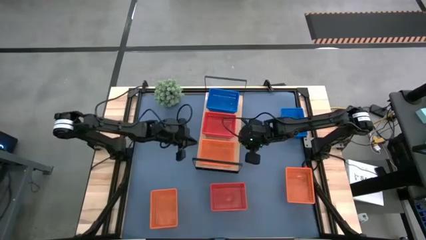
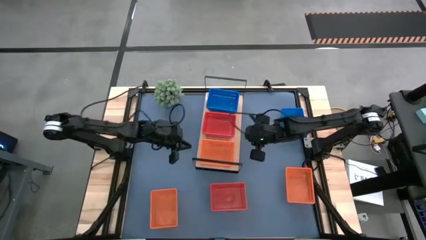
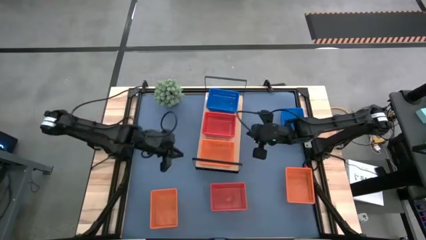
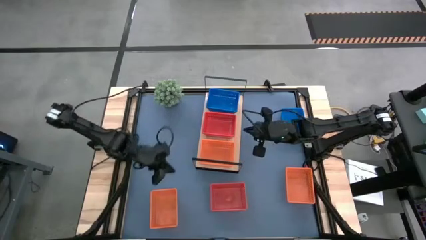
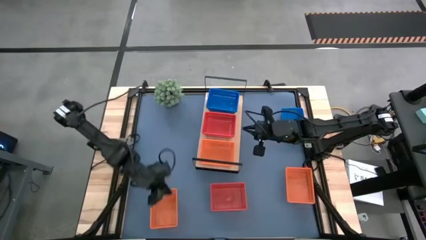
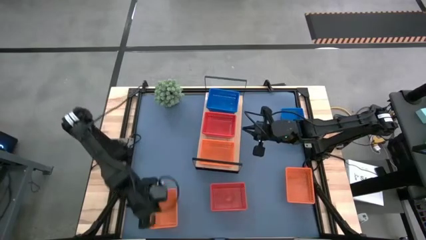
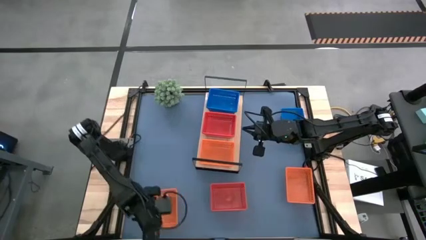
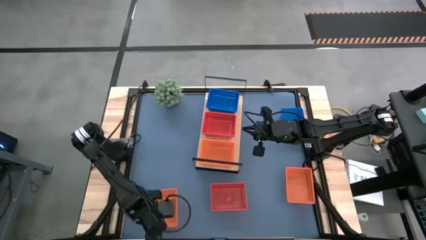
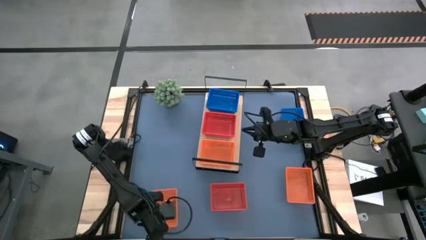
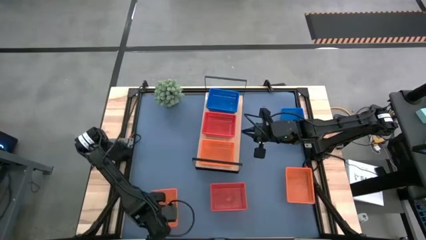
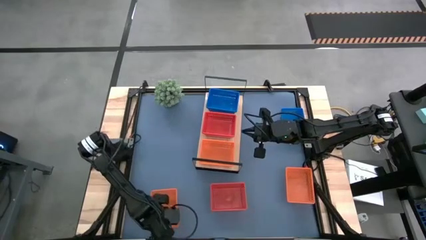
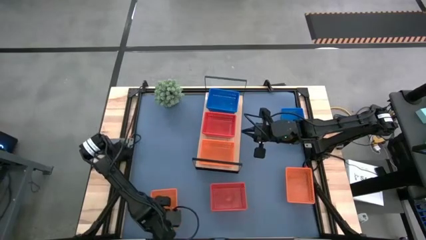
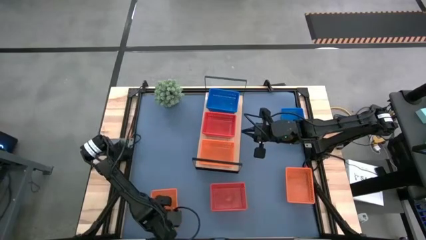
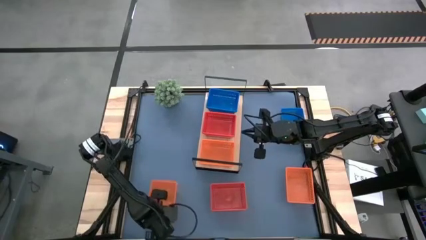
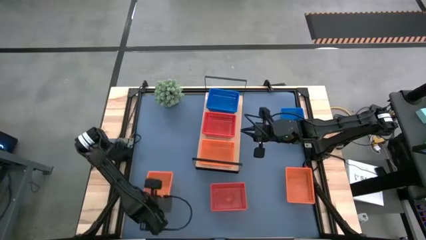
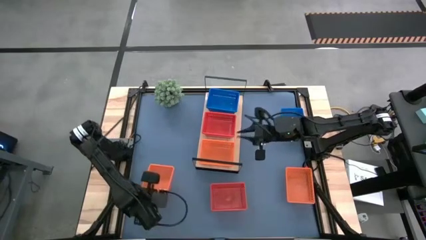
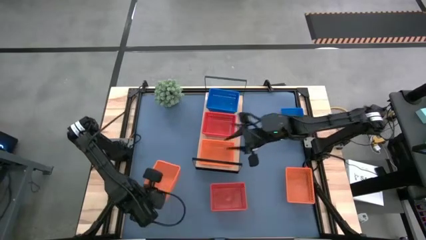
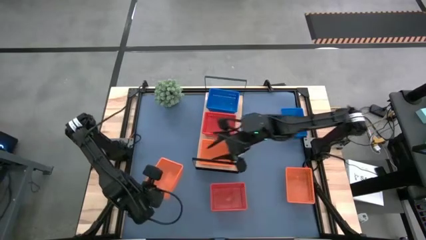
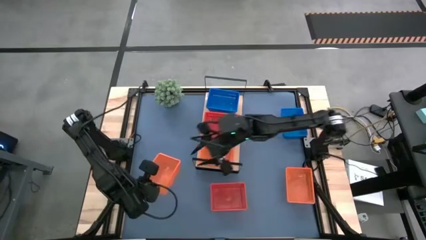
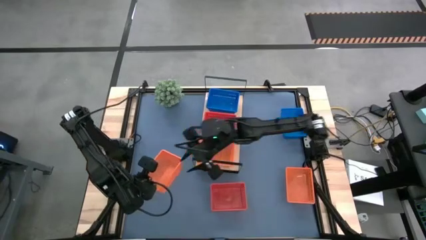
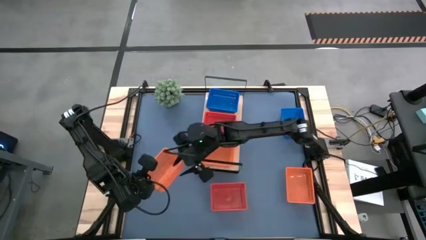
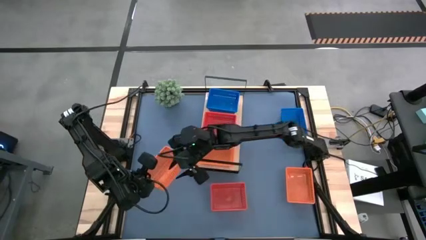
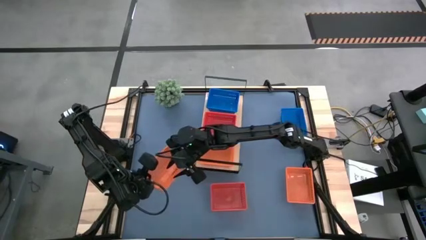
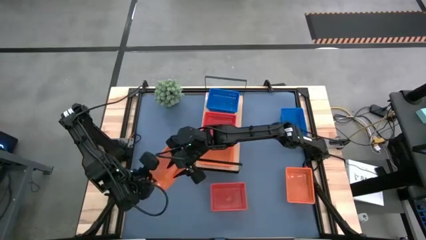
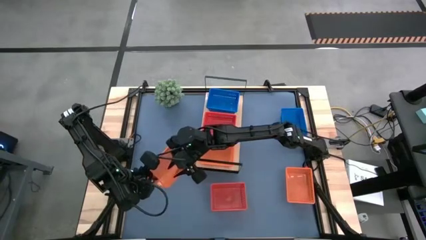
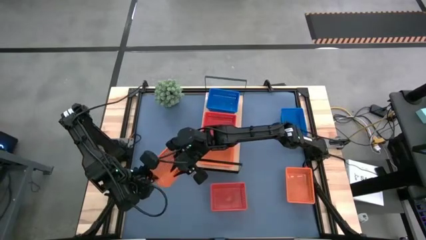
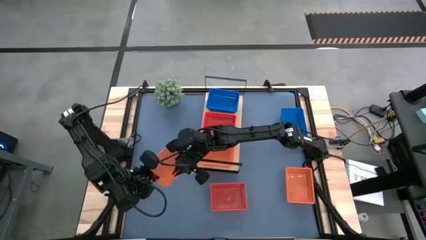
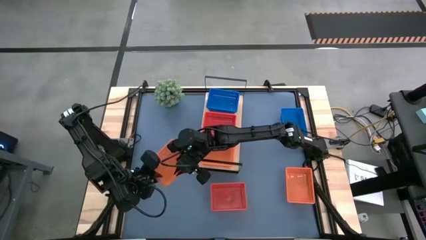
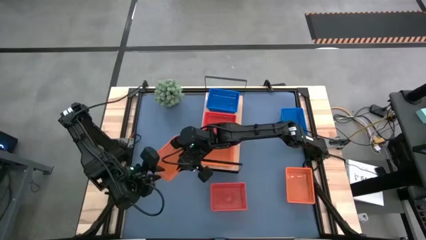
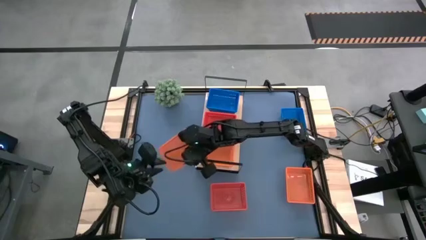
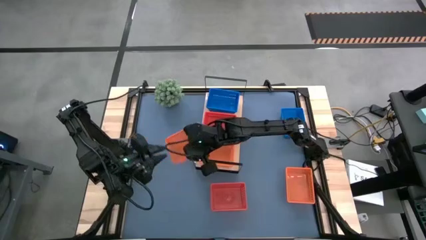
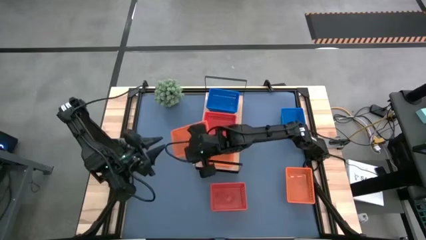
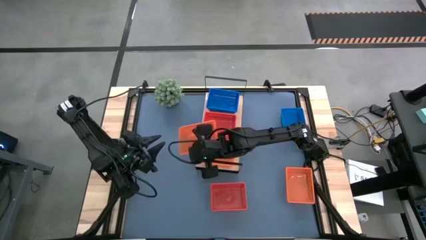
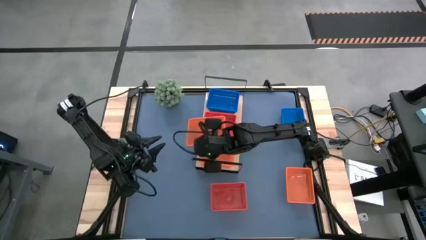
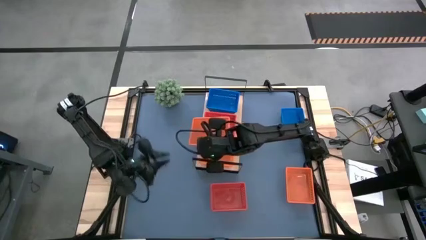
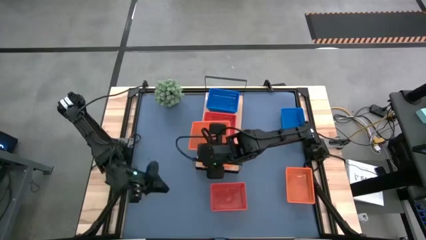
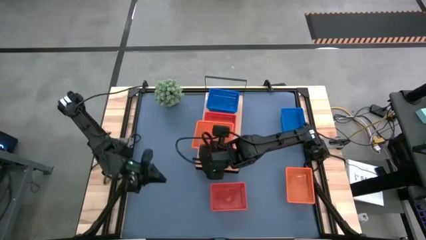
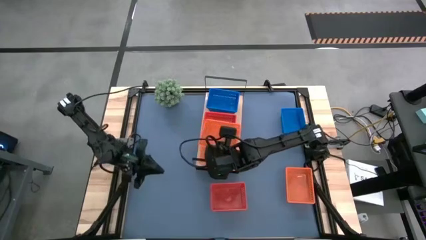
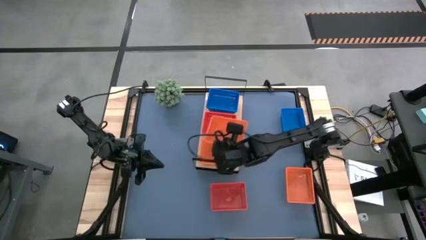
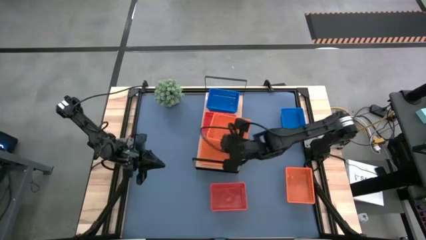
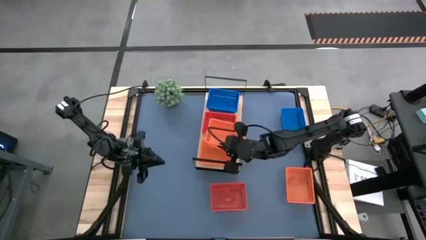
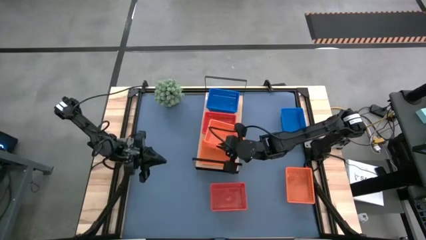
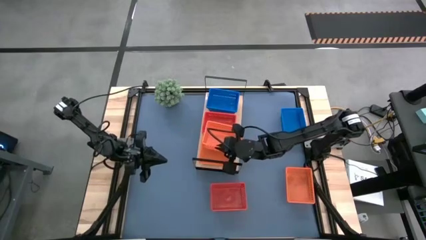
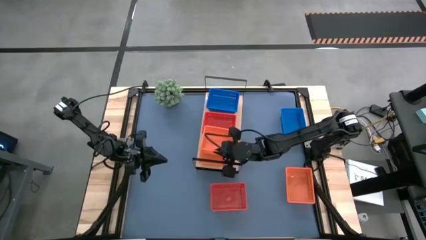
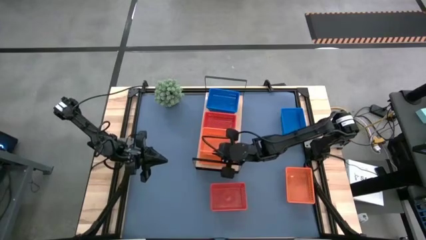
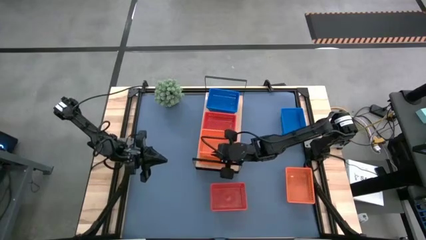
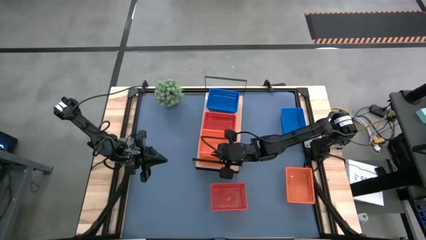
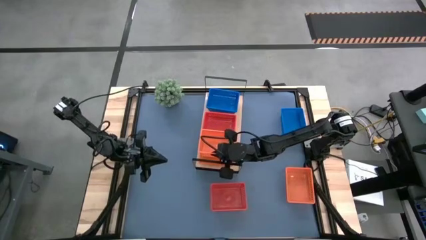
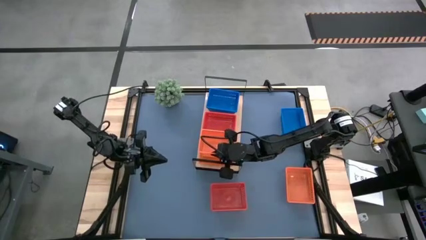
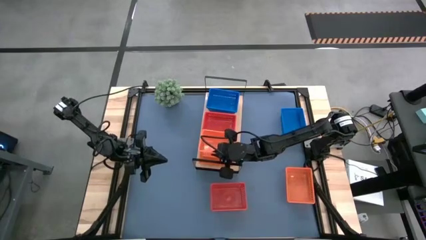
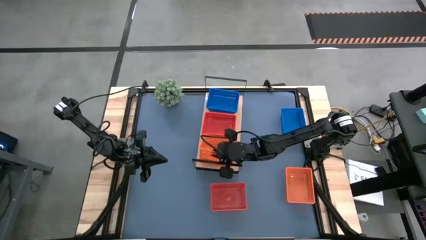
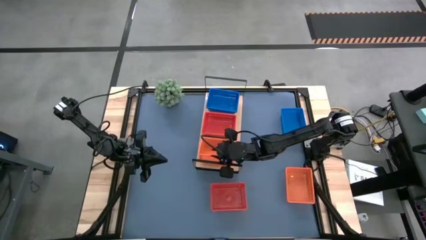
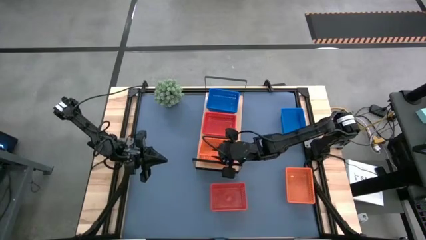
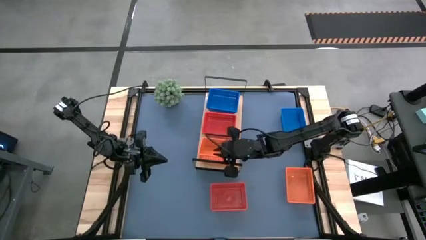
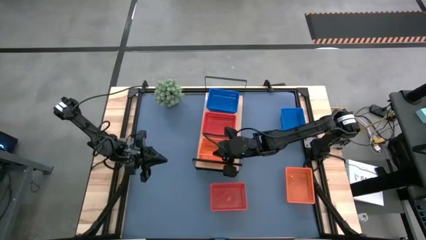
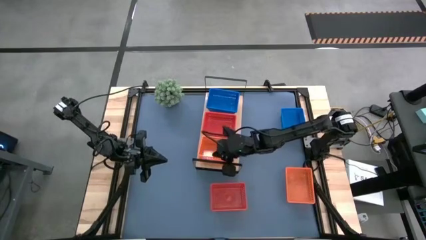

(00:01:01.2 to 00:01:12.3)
Task: Stack baskets on shelf by color
Stack the left orange bin on top of the orange bin on the shelf
